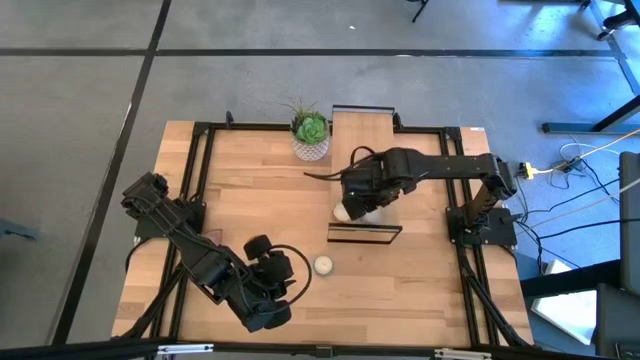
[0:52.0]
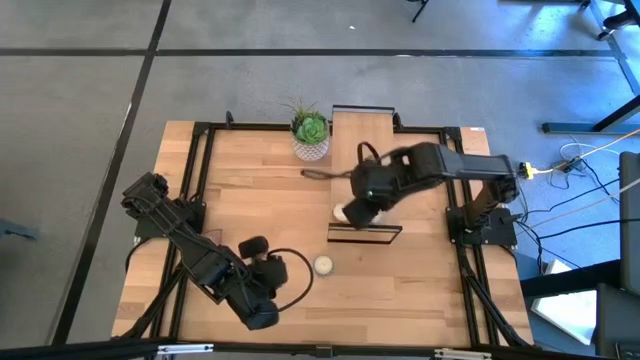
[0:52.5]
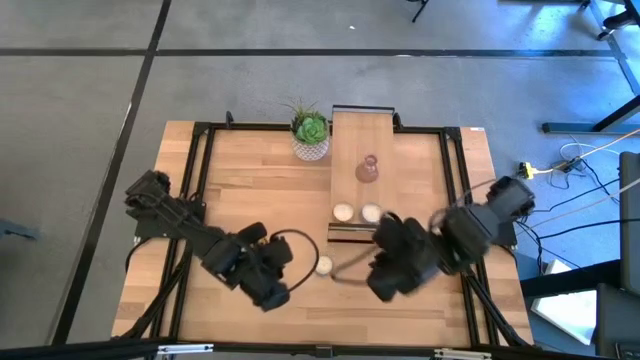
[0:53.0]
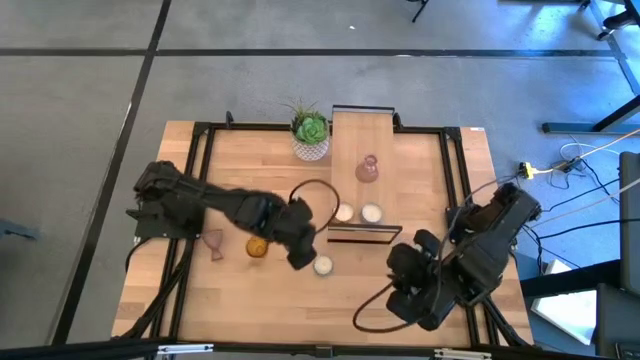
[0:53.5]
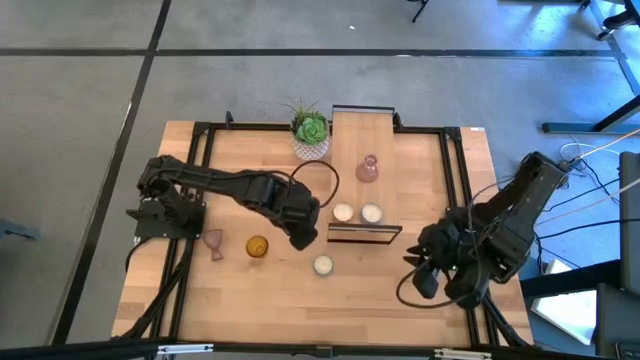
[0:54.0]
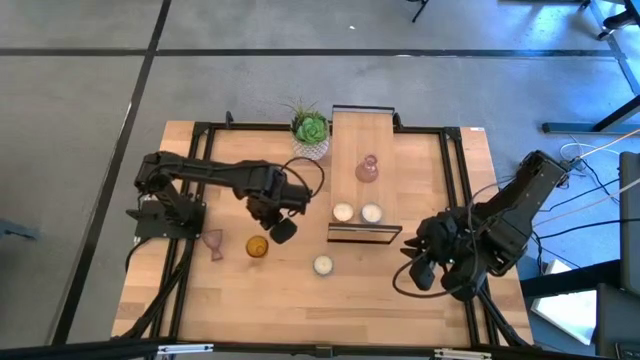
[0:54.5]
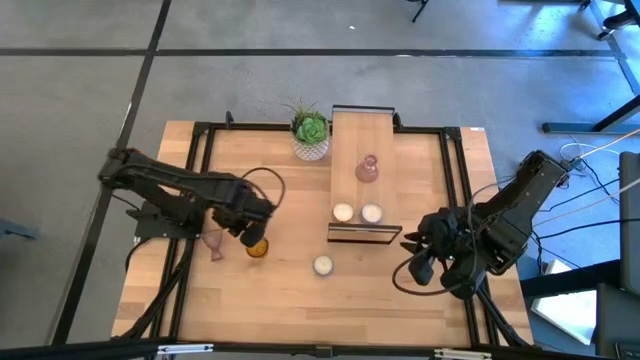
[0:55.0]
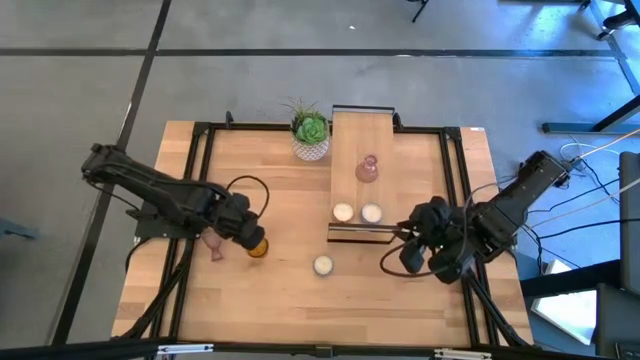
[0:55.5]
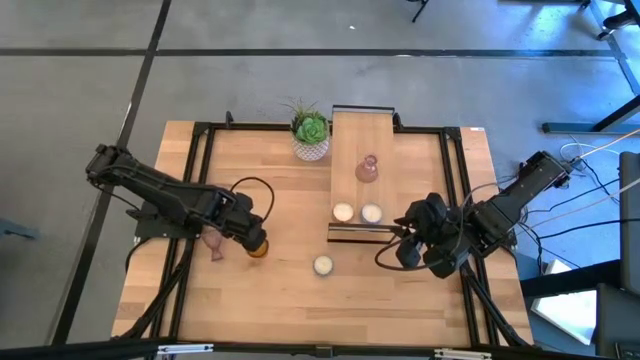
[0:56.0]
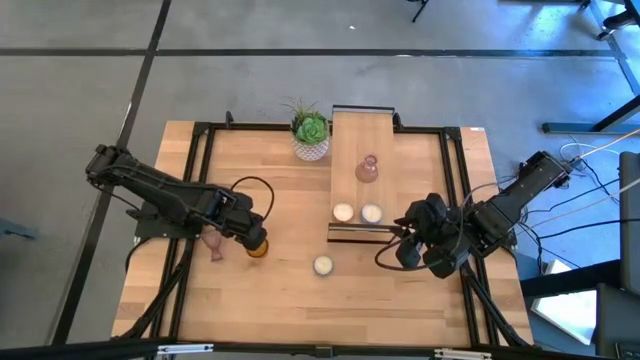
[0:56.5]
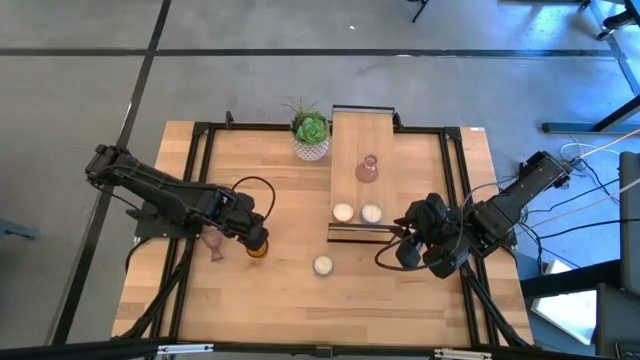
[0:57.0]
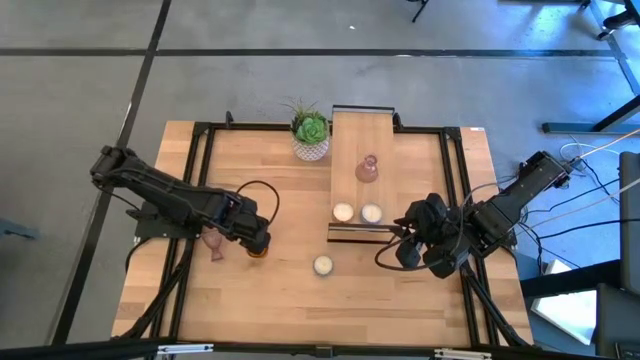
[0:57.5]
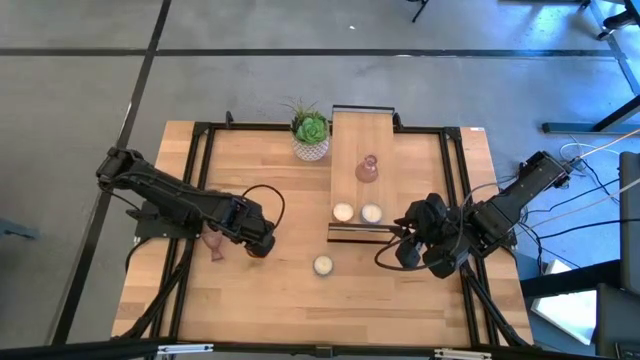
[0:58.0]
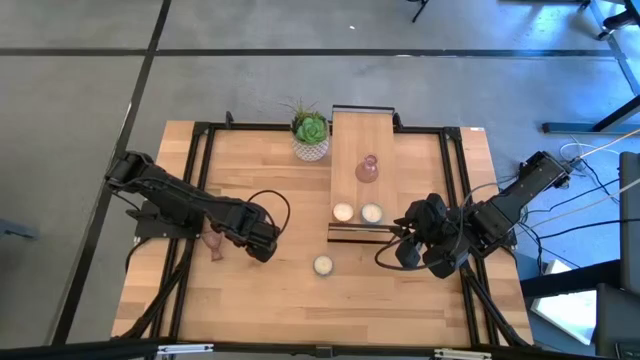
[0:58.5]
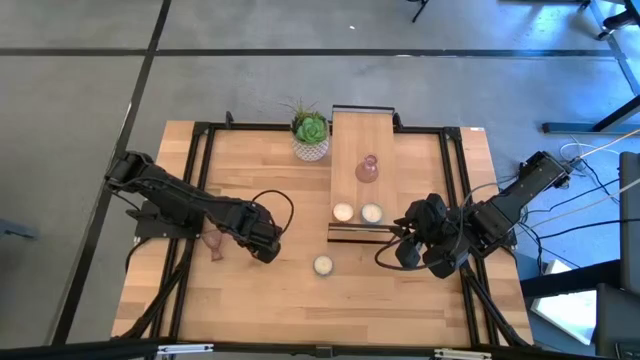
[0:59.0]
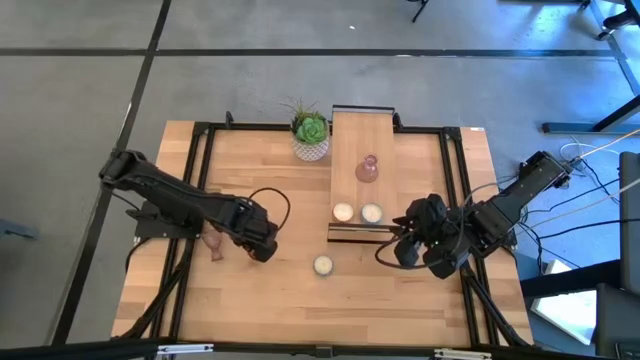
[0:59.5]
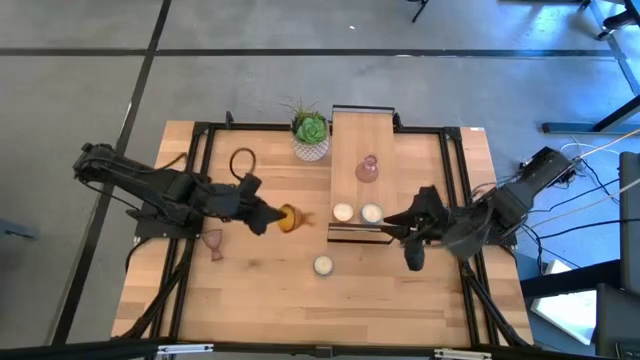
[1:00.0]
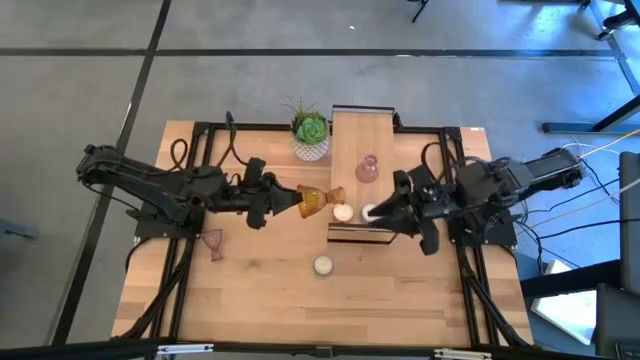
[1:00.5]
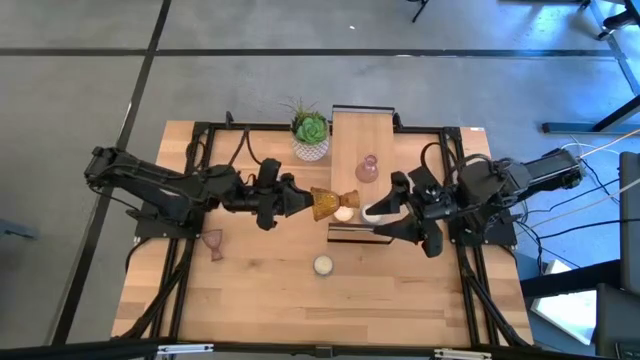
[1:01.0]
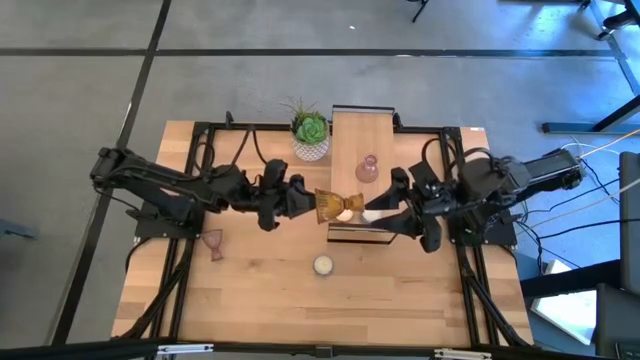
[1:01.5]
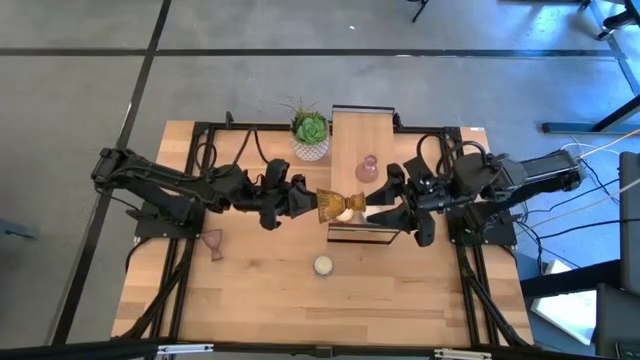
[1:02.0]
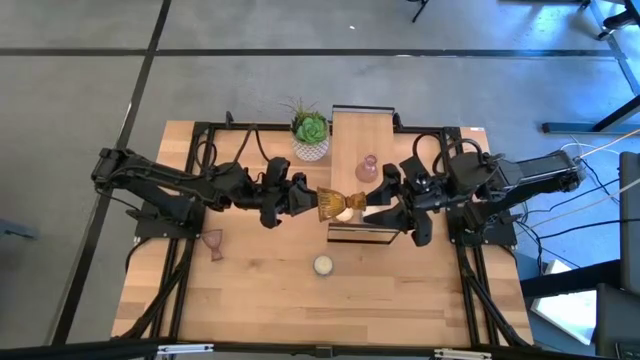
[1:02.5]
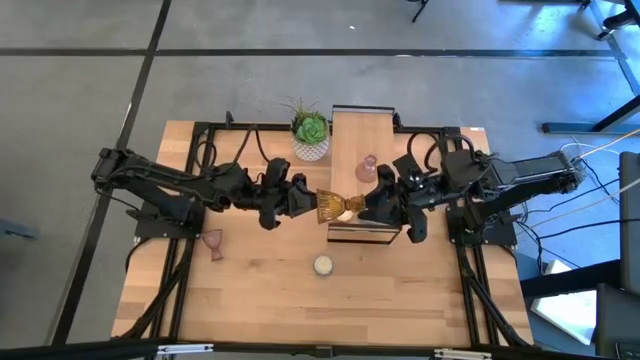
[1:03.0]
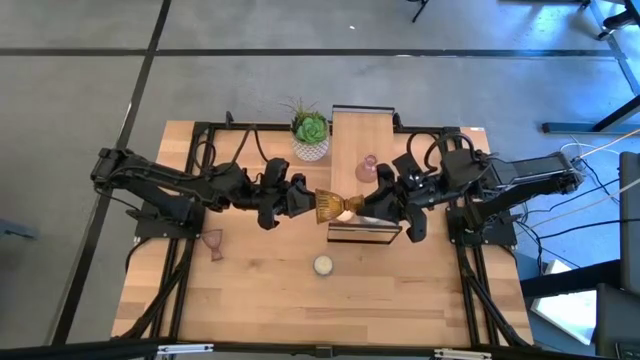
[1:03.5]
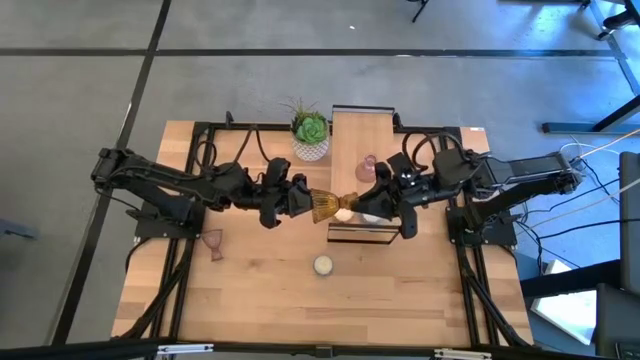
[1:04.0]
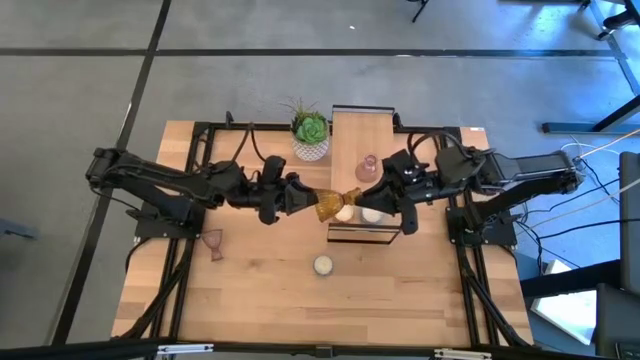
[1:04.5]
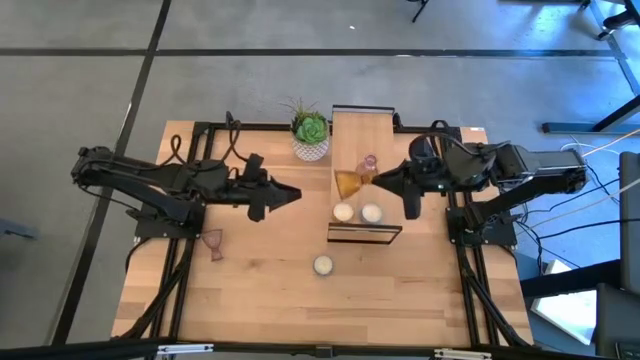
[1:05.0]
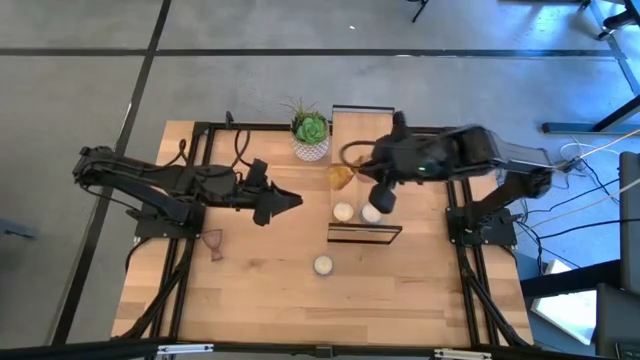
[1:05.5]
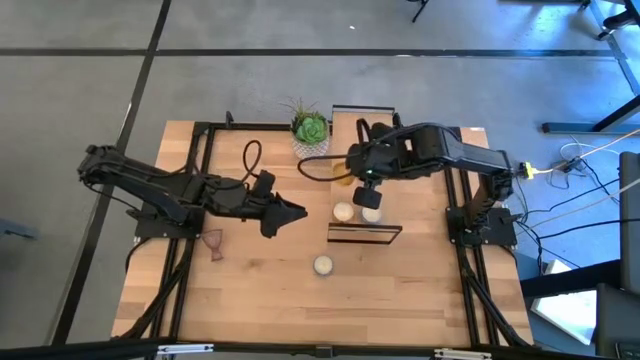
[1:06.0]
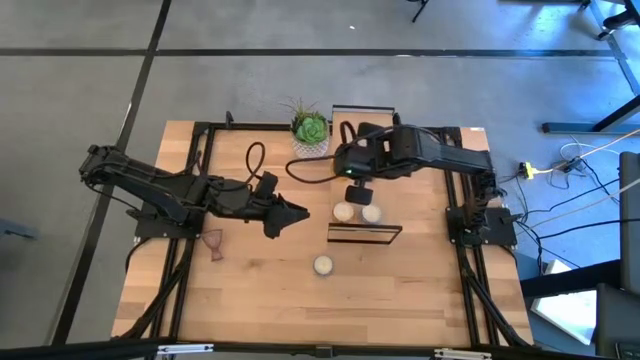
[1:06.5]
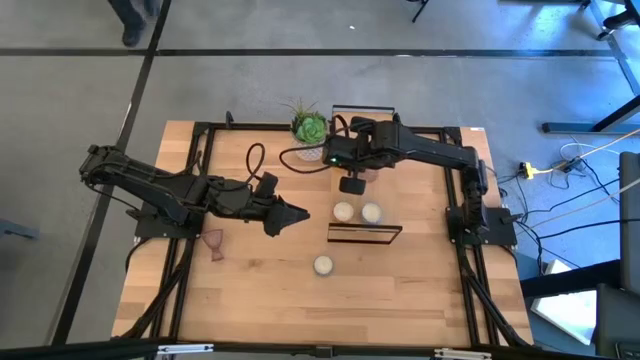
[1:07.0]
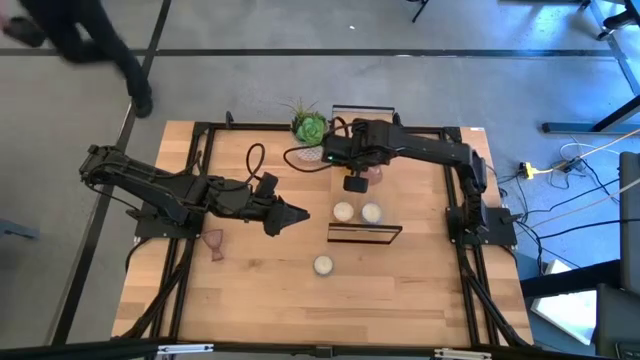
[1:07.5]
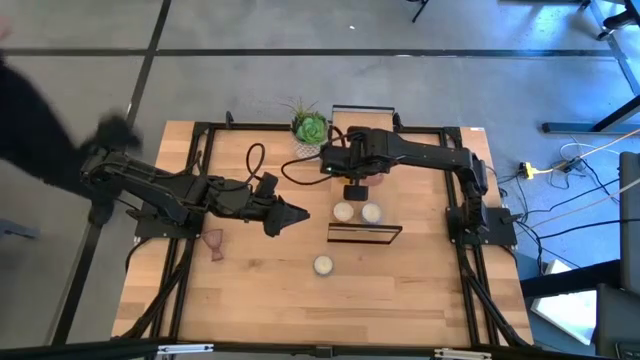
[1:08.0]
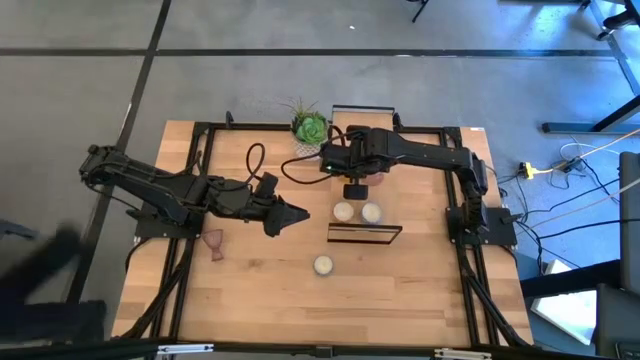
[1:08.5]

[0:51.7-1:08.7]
Task: Pick & Place candle stick holders
Put the orange glass candle holder on the shelf aligned with the pink glass candle holder

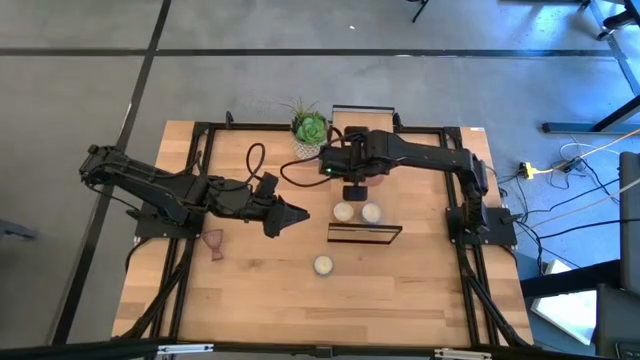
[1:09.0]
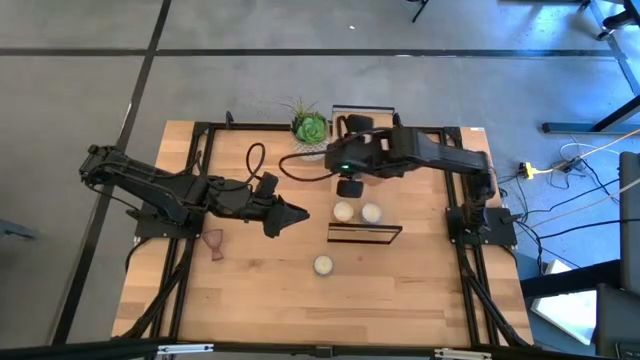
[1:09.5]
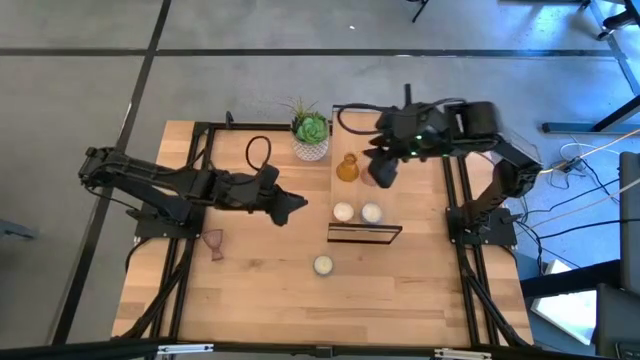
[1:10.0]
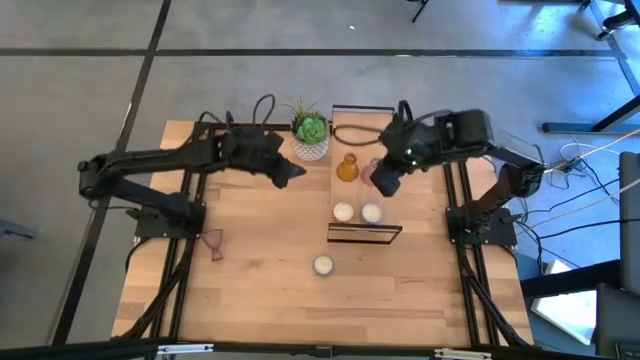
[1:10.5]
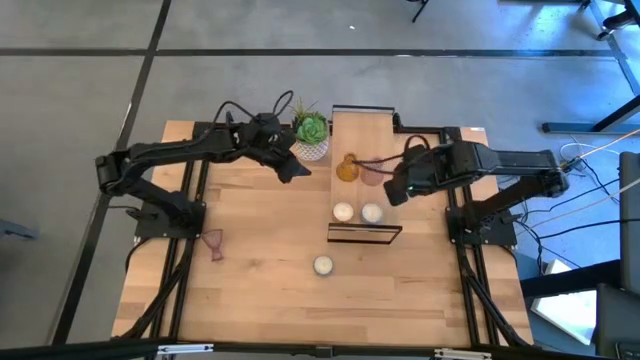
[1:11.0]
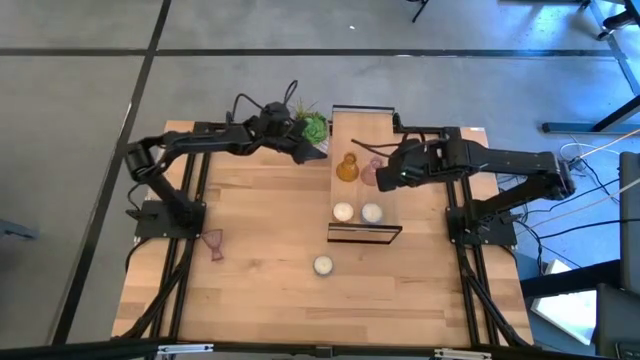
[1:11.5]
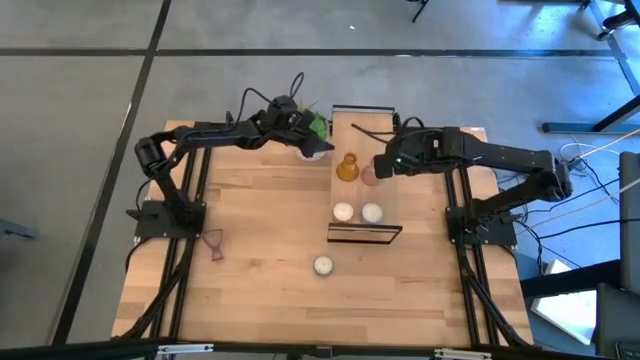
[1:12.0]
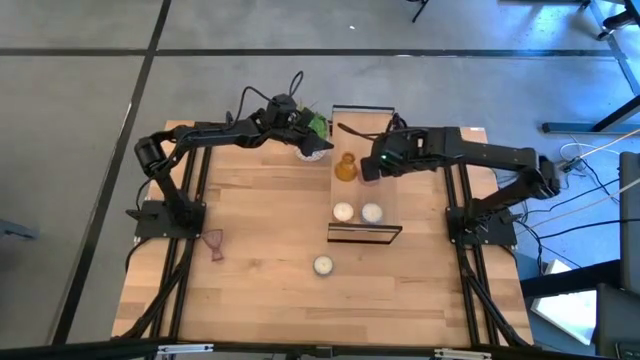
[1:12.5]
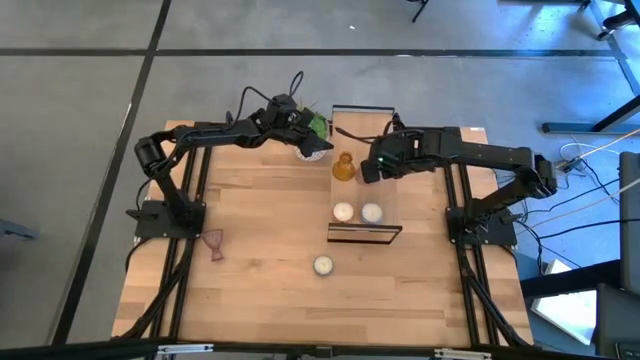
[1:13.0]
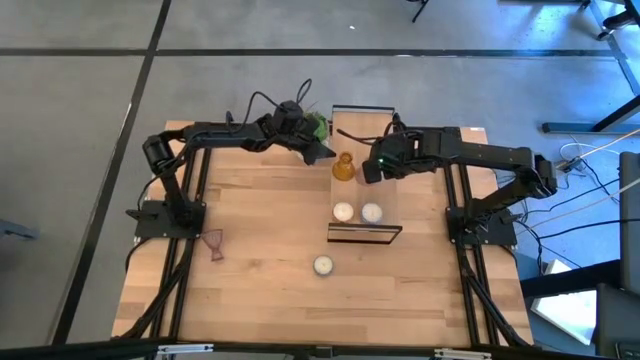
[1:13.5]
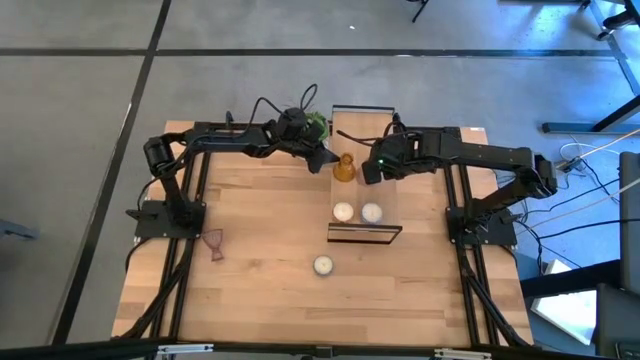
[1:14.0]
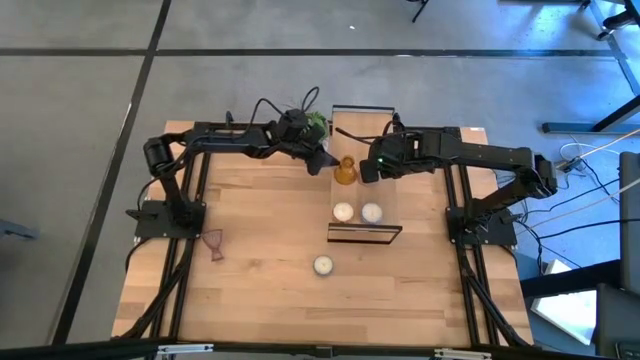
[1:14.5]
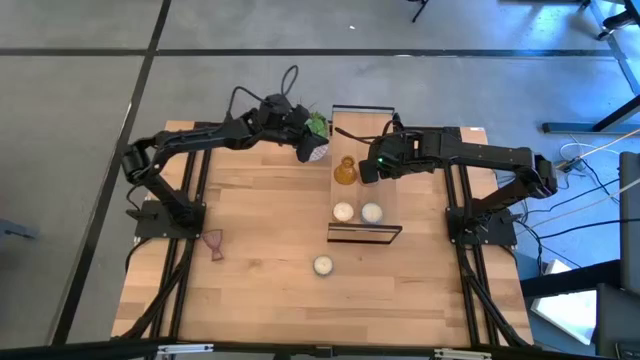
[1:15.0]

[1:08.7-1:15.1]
Adjust the glass candle holders on the shelf
